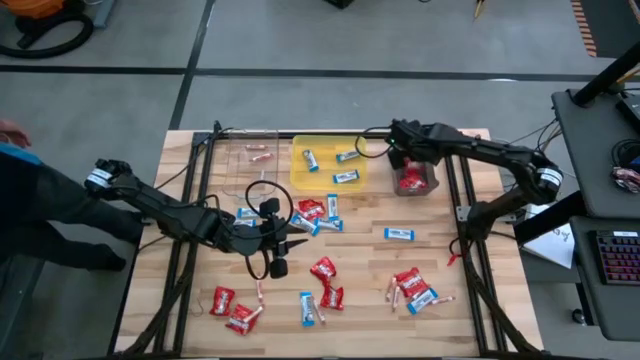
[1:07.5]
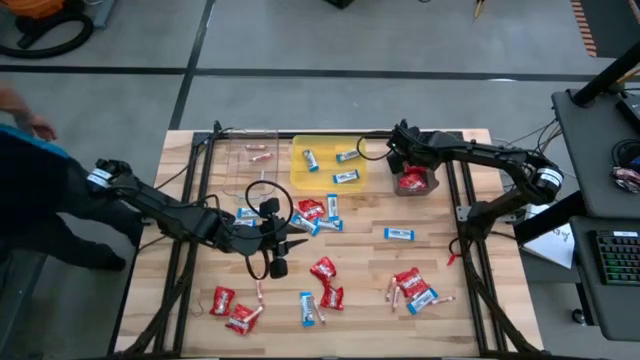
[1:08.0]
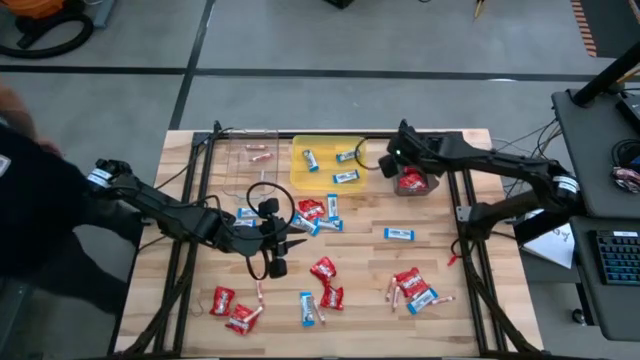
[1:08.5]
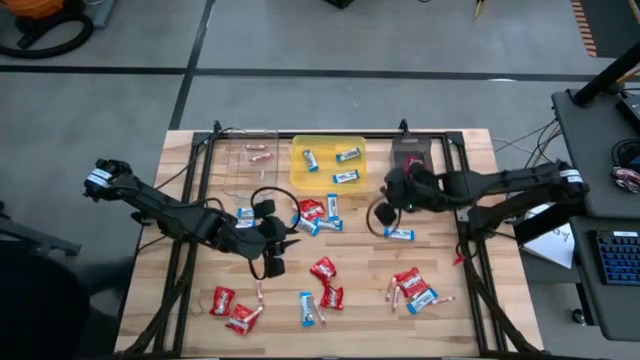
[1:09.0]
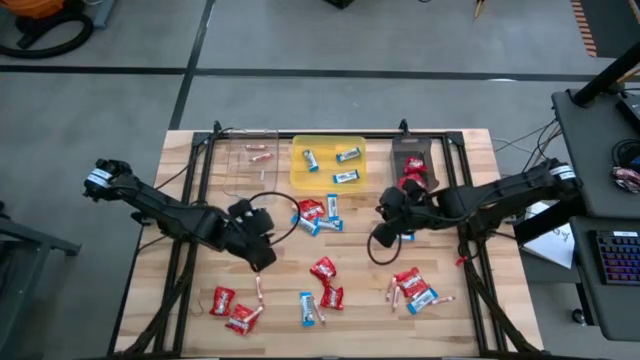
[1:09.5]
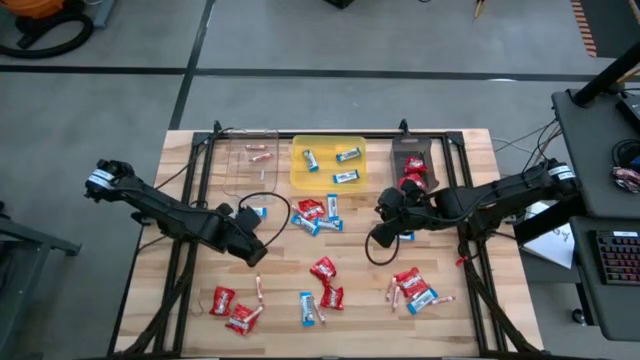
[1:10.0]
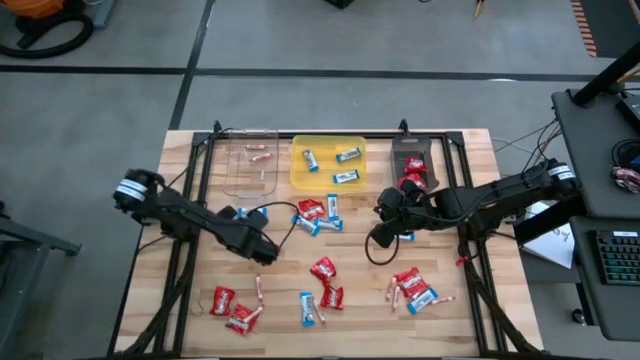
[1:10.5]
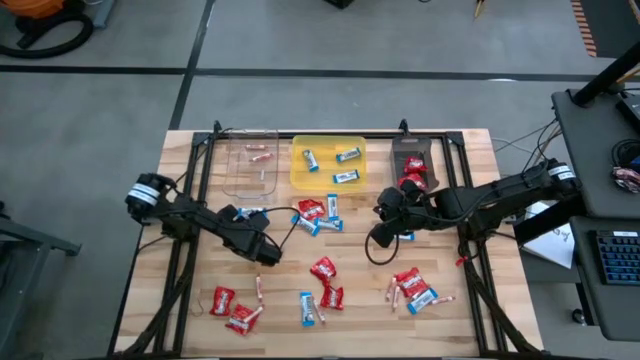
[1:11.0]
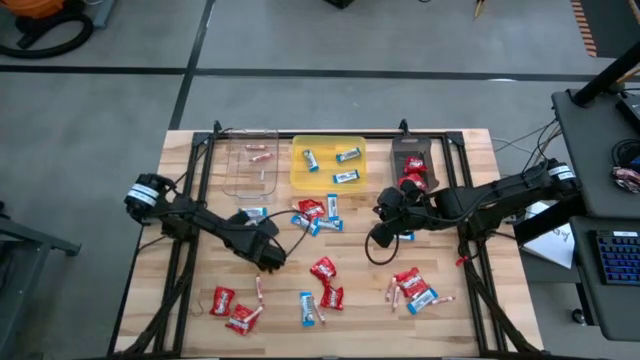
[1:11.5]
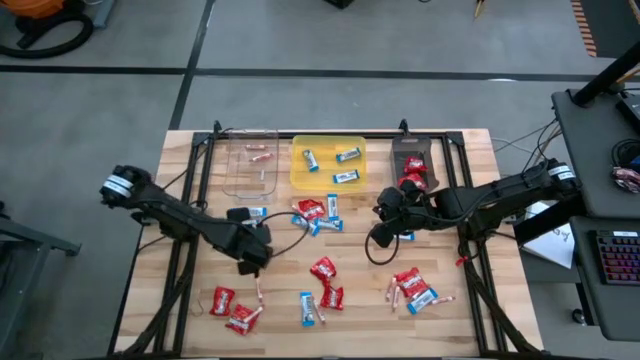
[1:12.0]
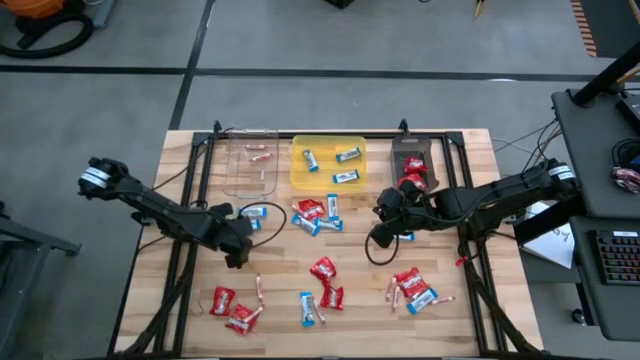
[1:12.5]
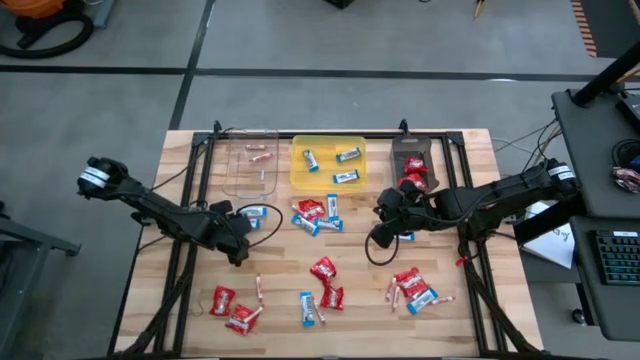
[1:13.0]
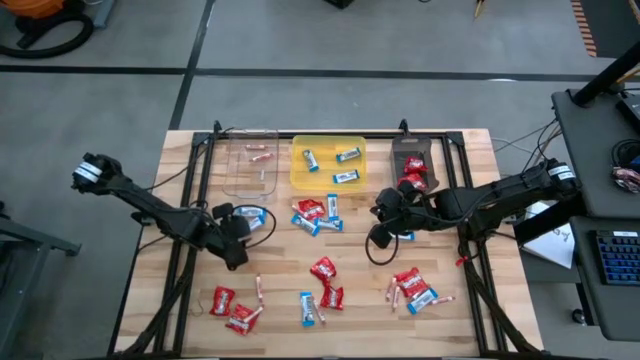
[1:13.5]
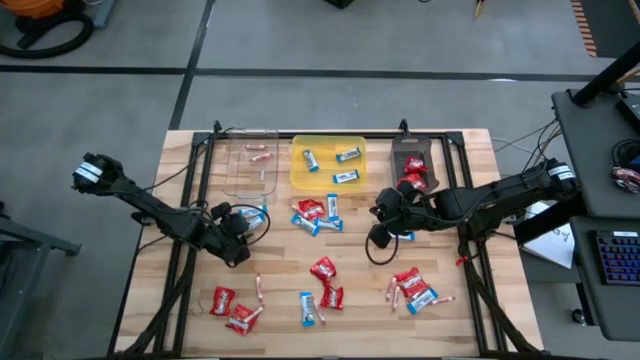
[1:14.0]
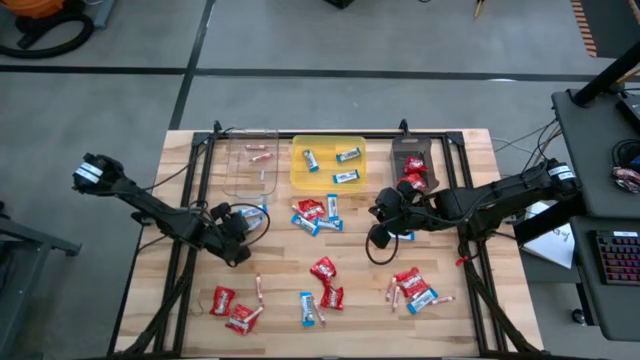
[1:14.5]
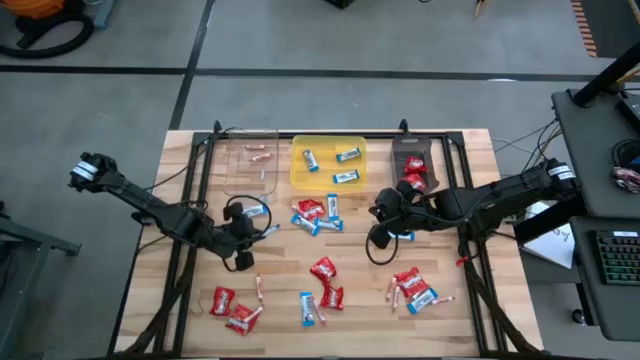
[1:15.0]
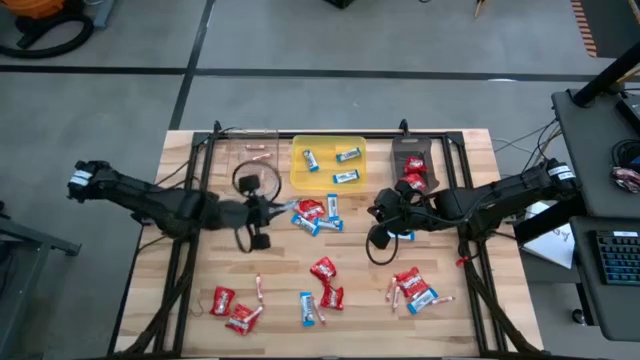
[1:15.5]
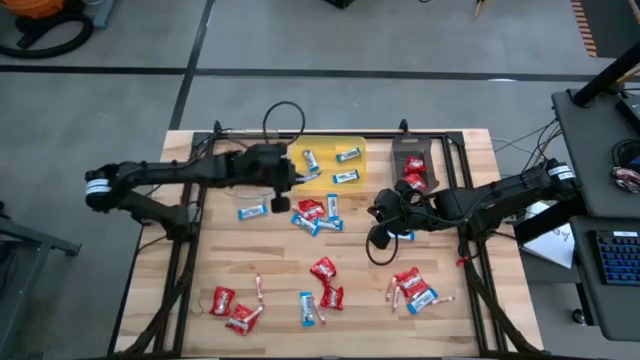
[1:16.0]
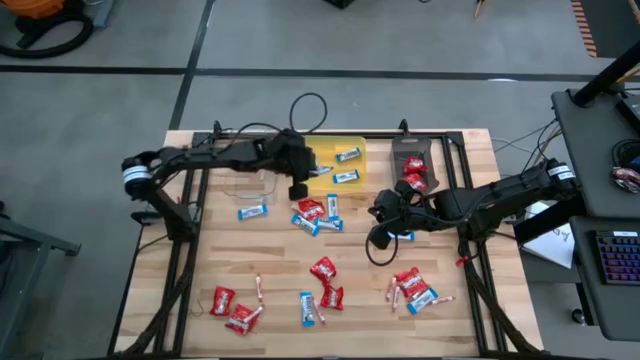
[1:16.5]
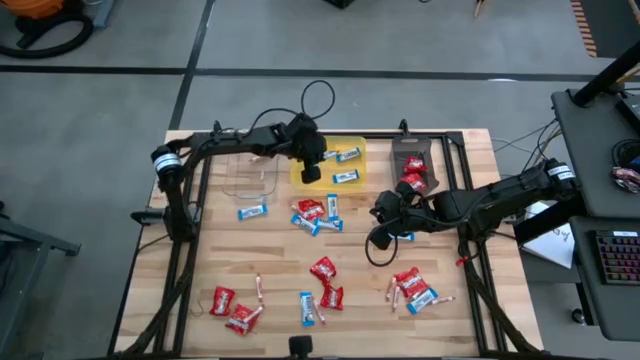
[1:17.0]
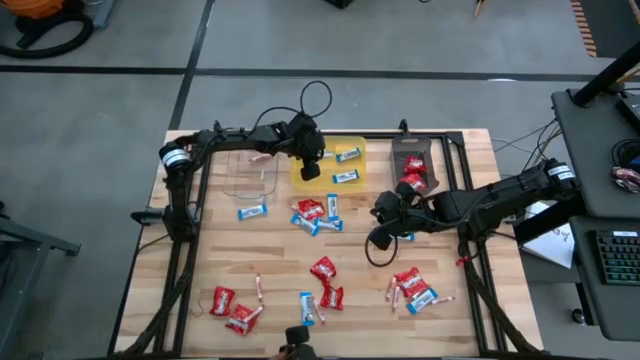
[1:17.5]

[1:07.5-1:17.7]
Task: Sort candy
Put the white chocolate into the yellow bin

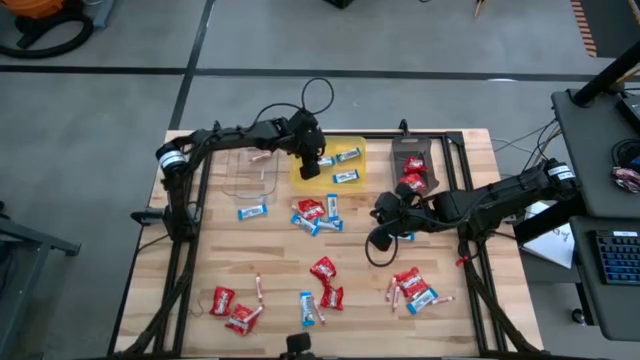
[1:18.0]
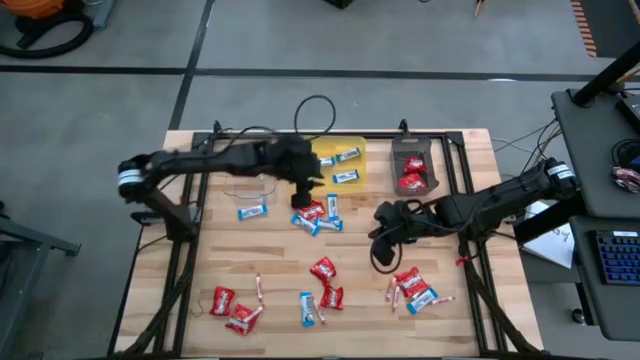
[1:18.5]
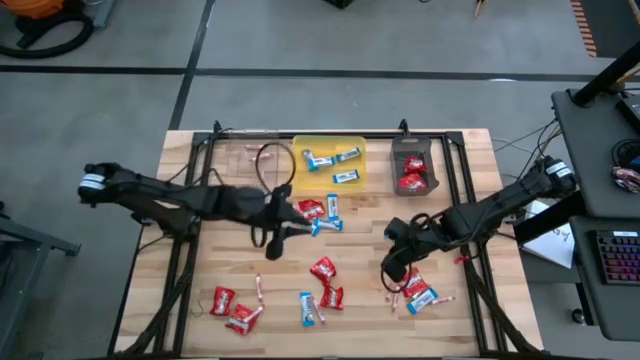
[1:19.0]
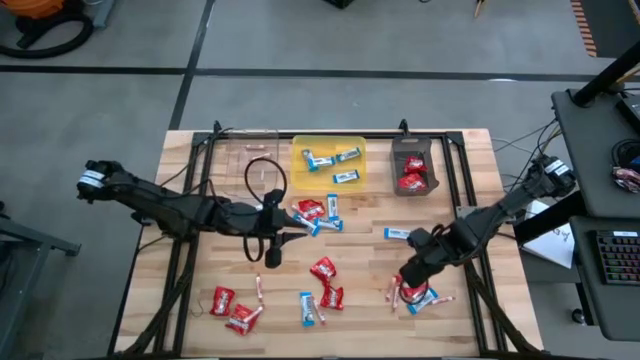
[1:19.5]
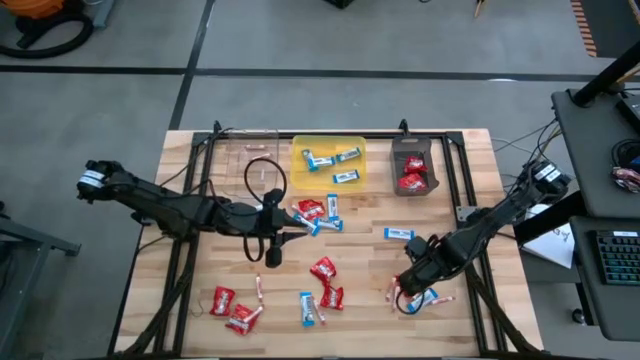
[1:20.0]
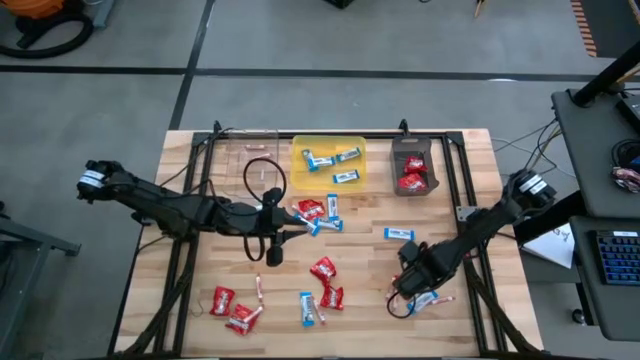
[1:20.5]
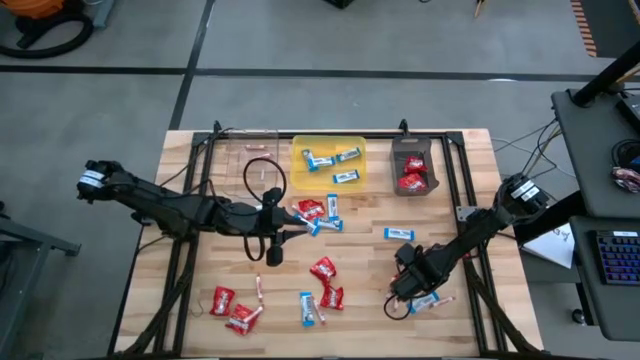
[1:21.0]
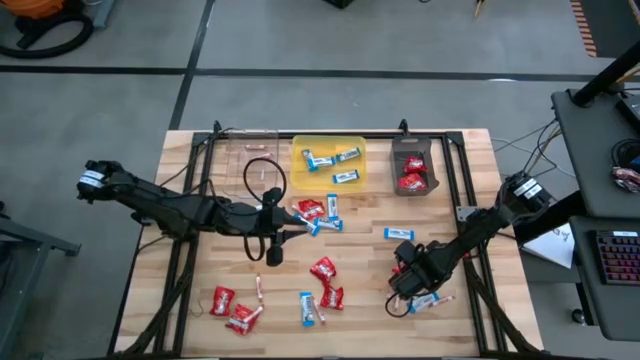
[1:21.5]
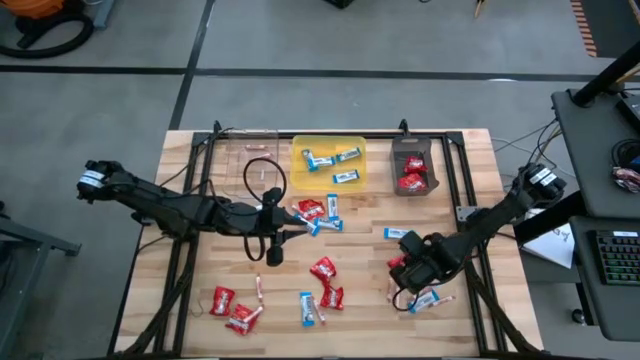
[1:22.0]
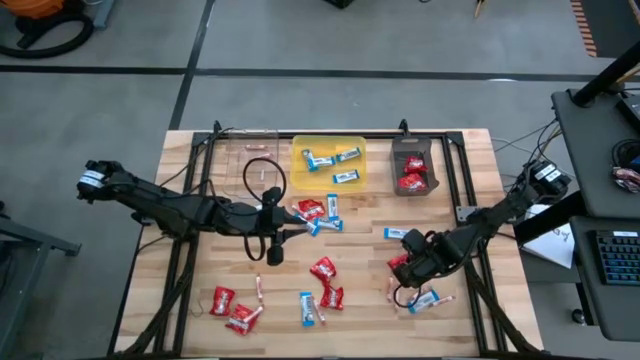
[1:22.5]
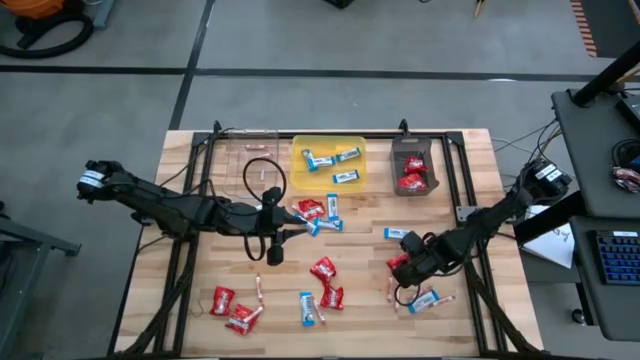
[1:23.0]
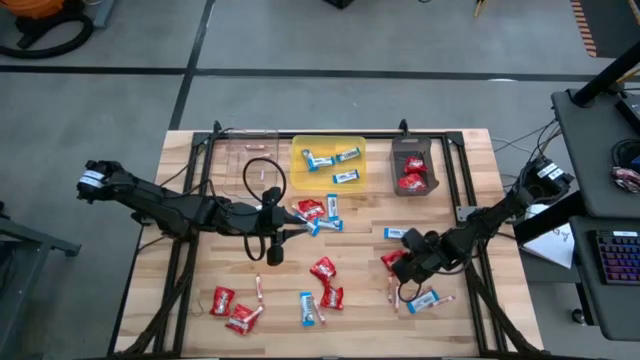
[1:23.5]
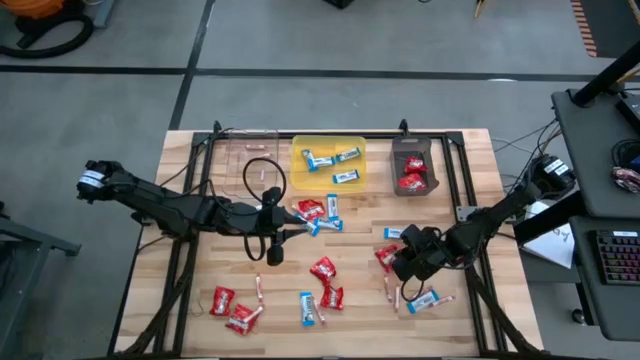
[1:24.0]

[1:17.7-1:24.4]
Put the red candy into the black bin

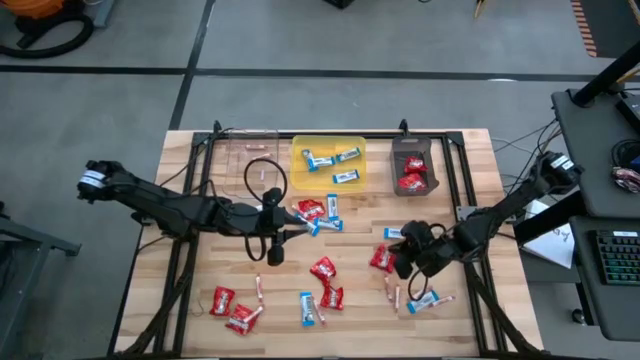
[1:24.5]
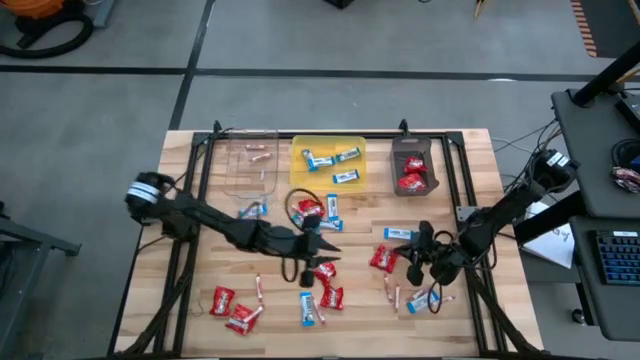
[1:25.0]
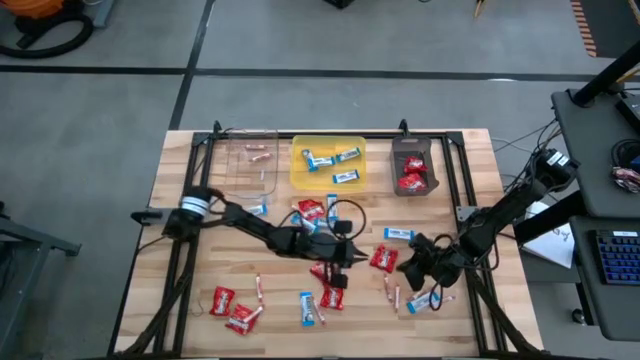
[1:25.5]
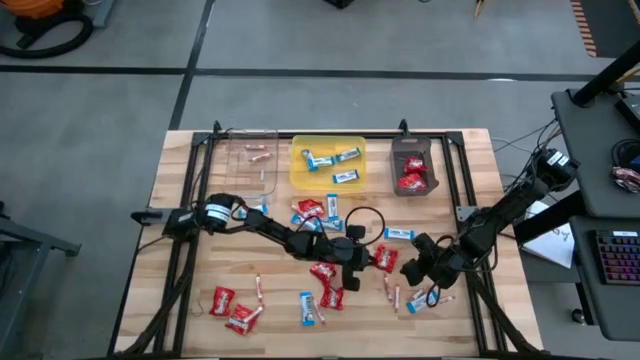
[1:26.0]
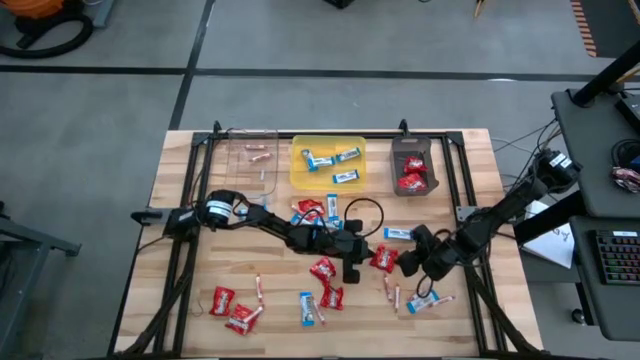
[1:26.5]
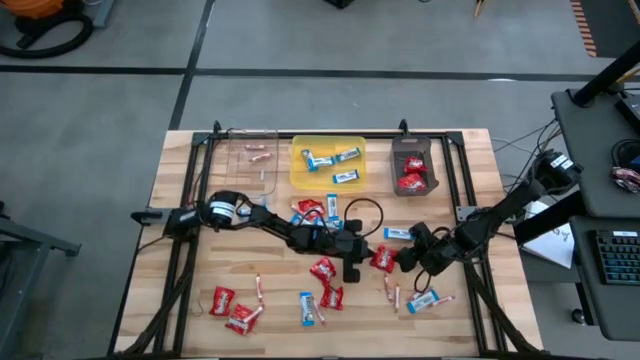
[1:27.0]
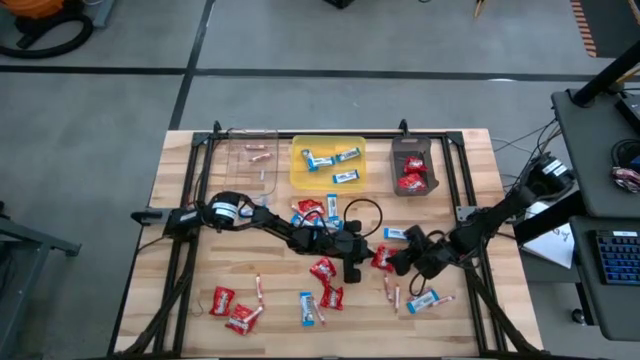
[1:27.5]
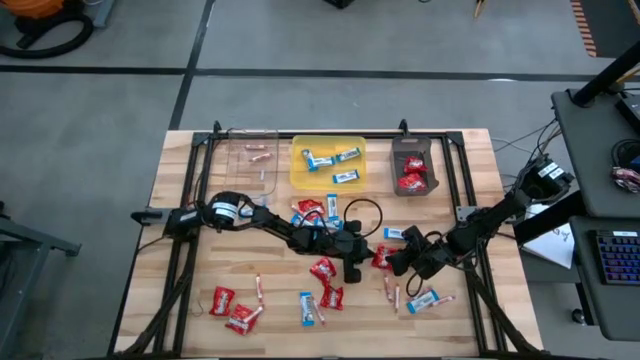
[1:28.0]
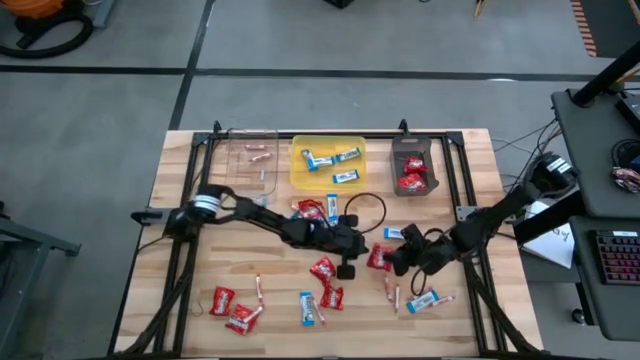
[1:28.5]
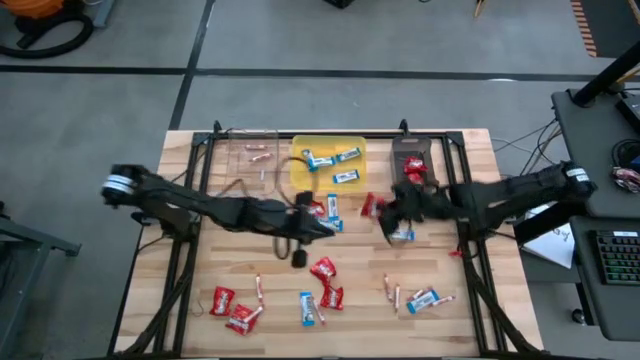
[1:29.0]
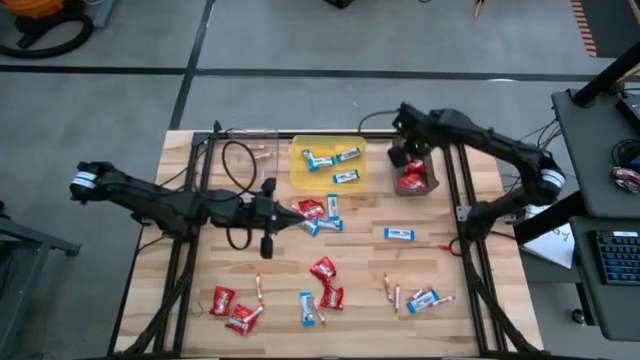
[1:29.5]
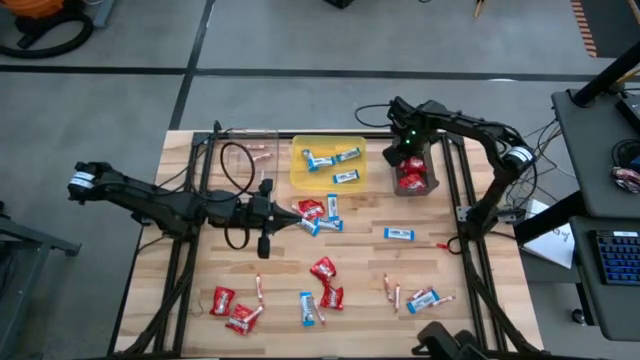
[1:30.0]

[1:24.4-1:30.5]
Put the red candy into the black bin
